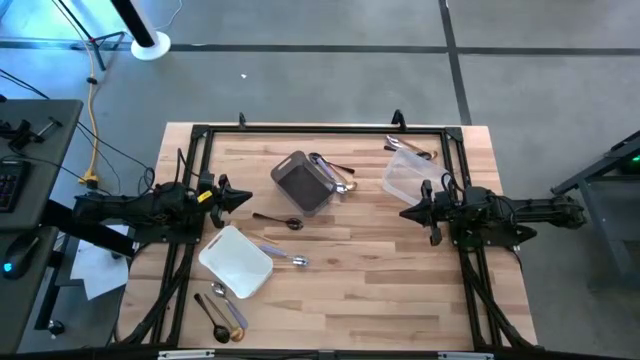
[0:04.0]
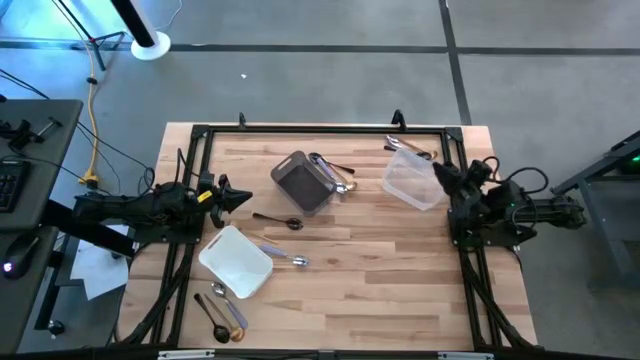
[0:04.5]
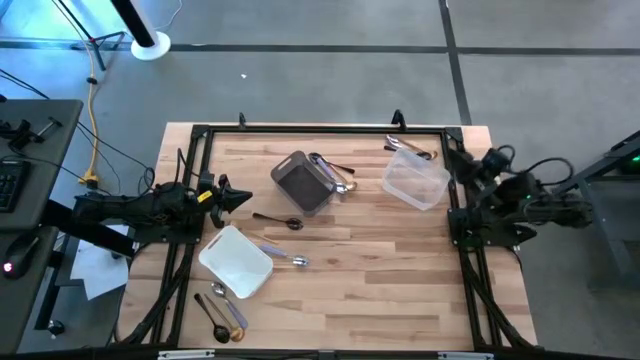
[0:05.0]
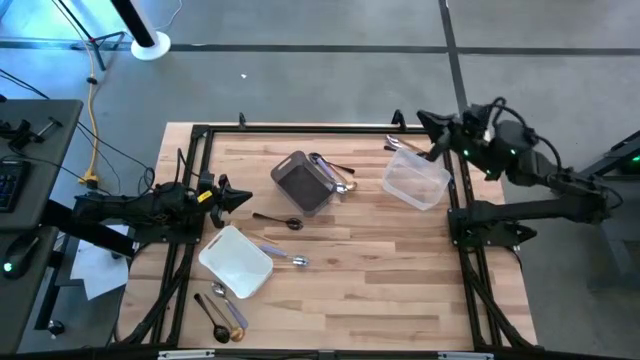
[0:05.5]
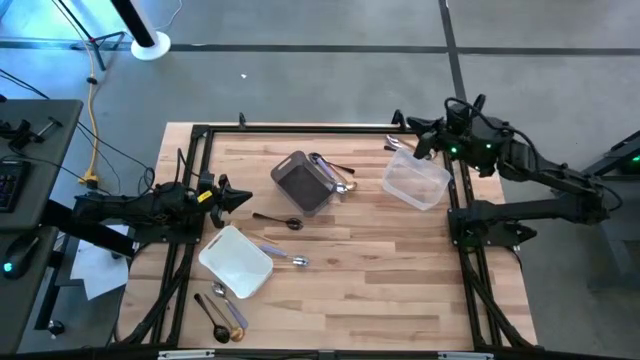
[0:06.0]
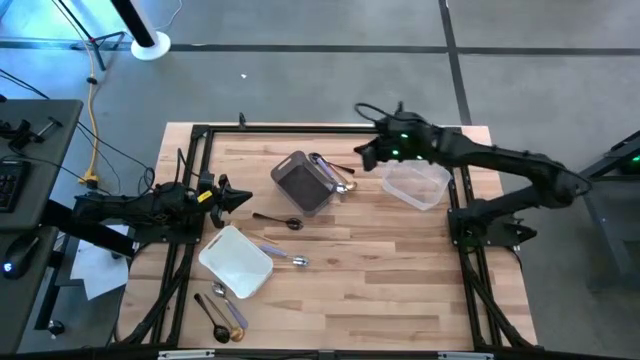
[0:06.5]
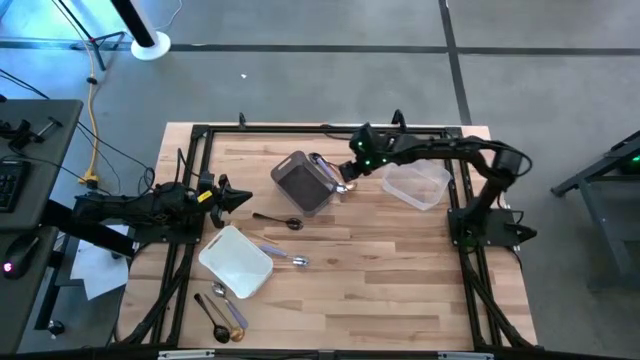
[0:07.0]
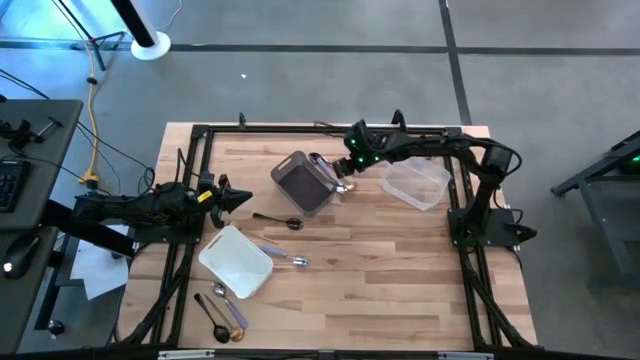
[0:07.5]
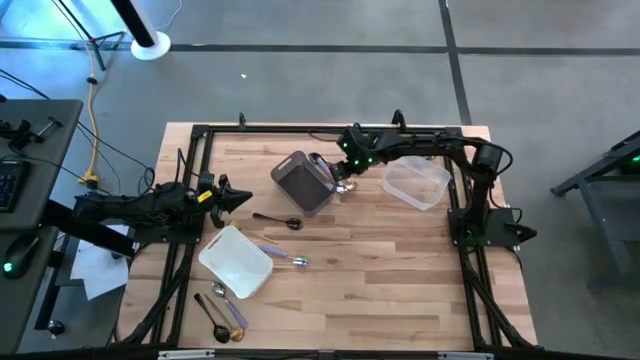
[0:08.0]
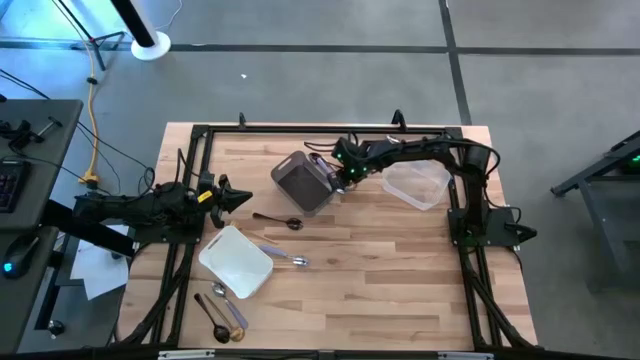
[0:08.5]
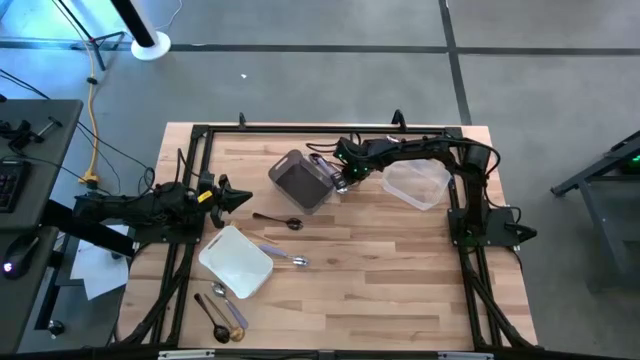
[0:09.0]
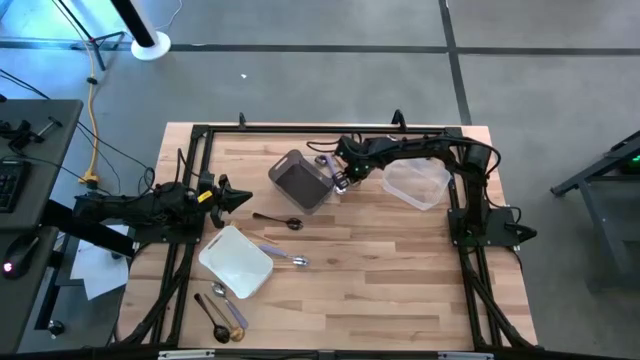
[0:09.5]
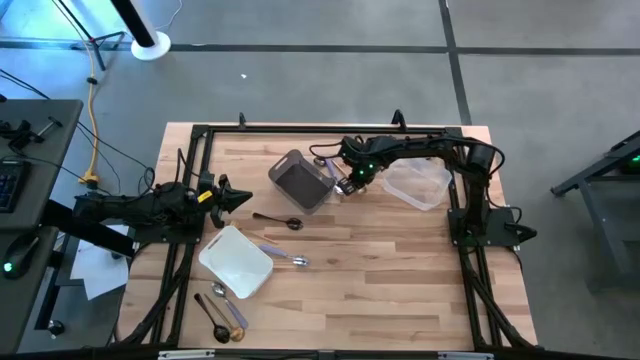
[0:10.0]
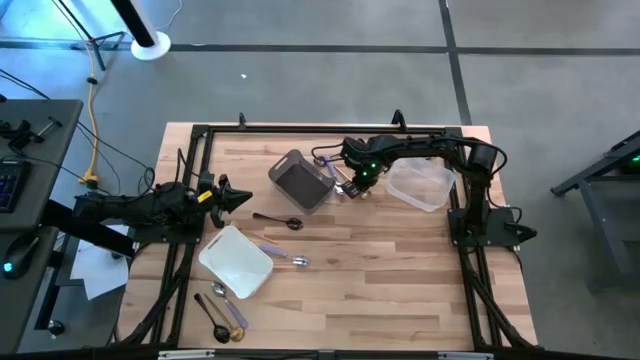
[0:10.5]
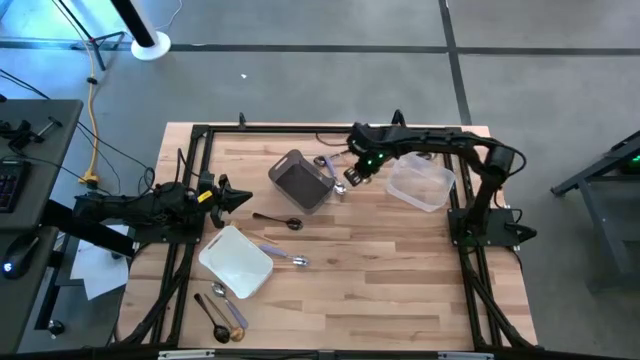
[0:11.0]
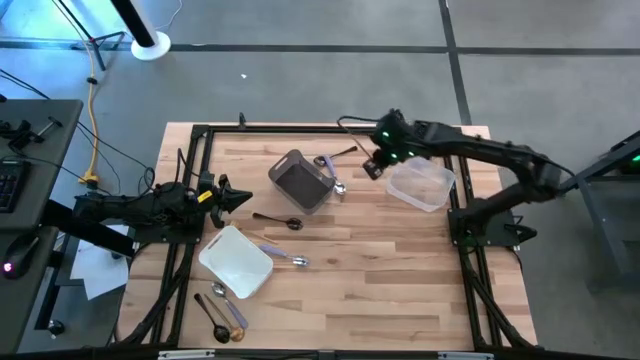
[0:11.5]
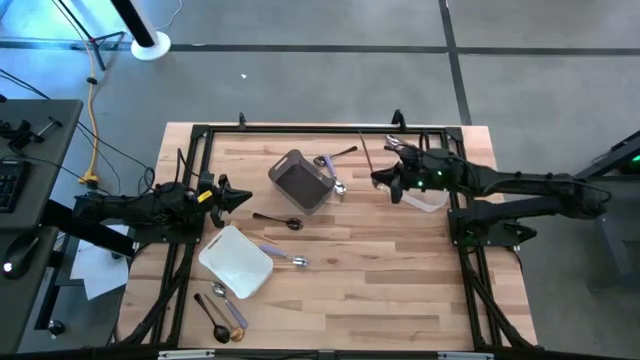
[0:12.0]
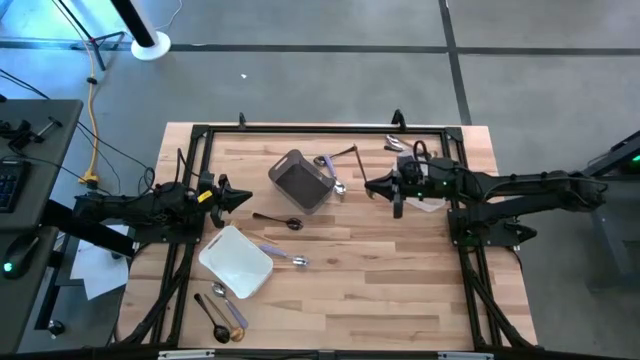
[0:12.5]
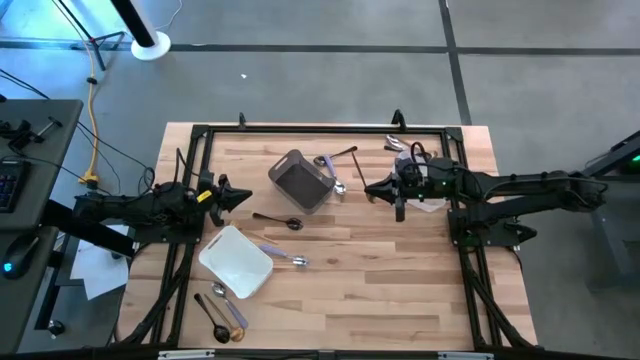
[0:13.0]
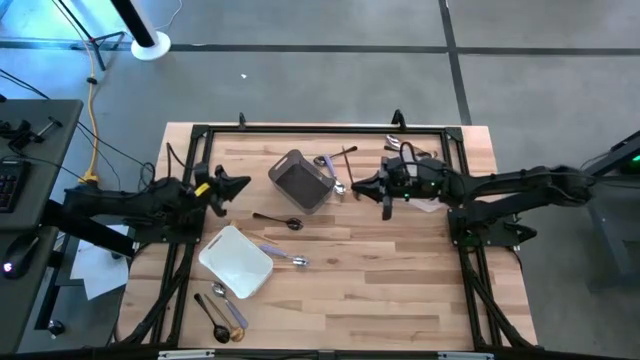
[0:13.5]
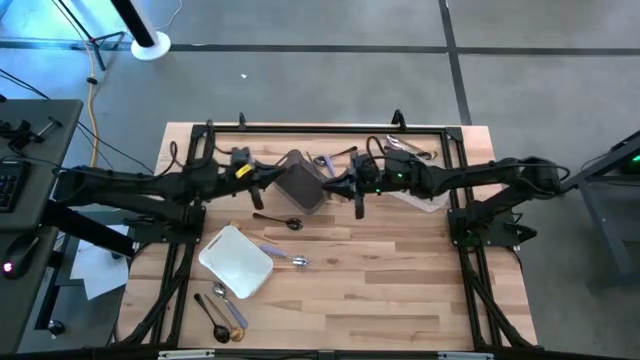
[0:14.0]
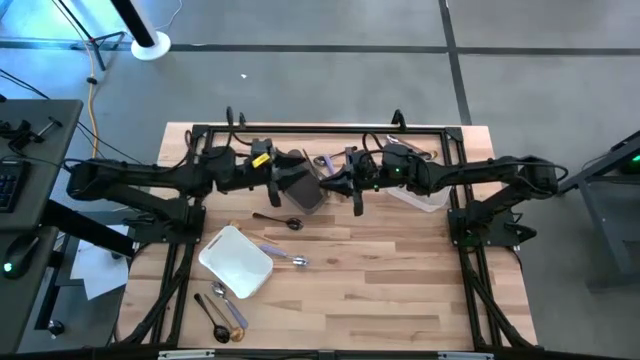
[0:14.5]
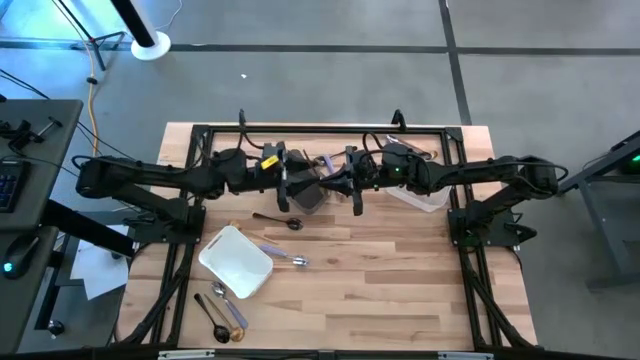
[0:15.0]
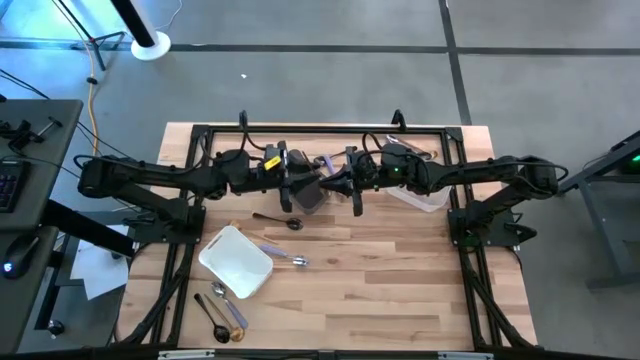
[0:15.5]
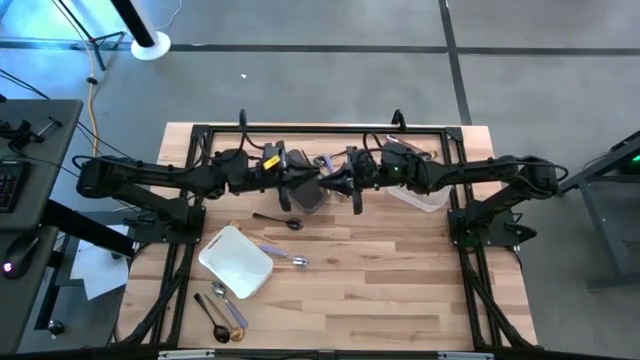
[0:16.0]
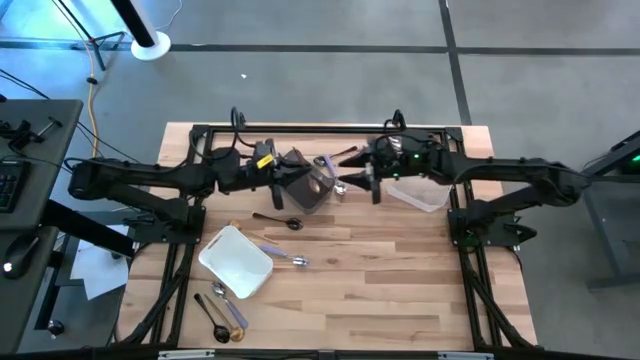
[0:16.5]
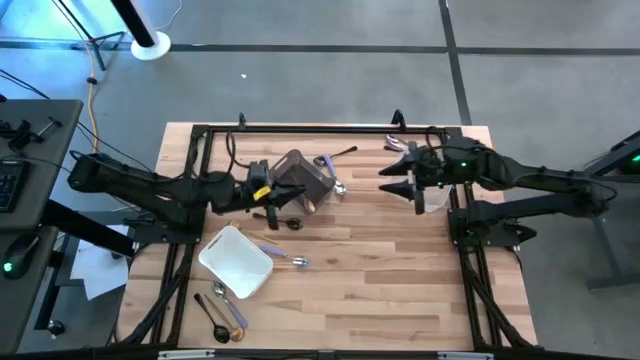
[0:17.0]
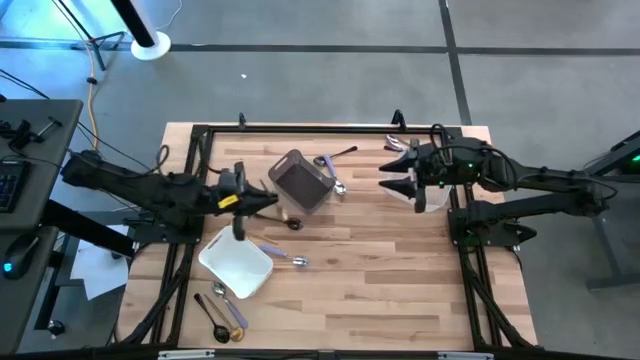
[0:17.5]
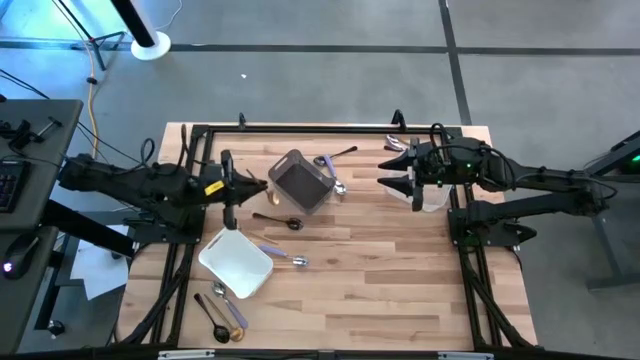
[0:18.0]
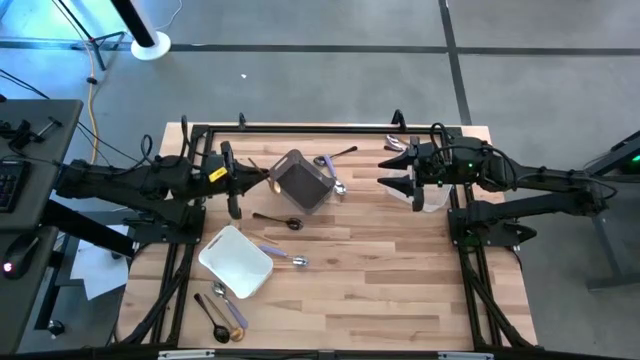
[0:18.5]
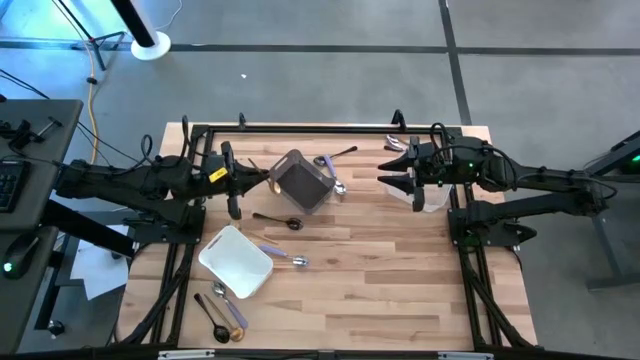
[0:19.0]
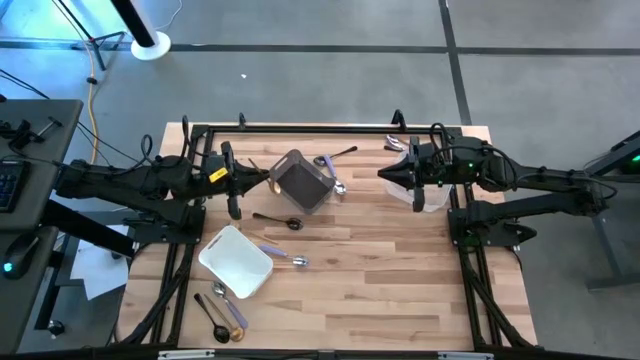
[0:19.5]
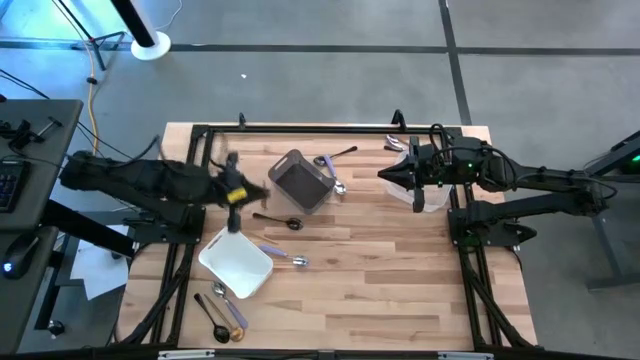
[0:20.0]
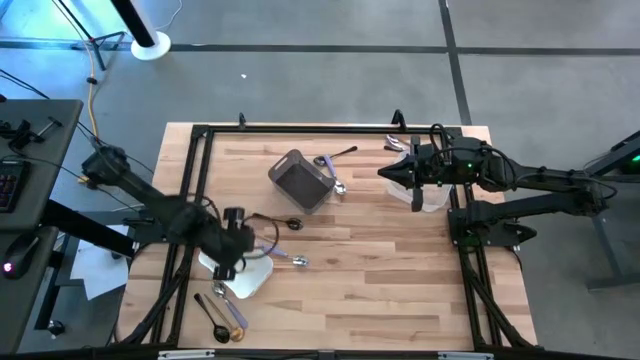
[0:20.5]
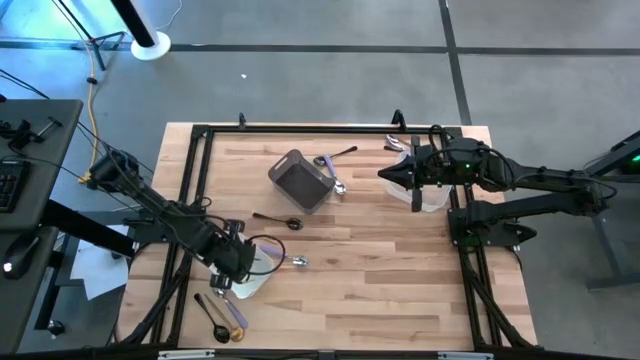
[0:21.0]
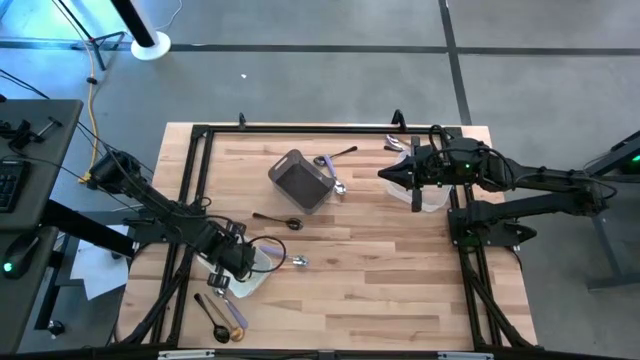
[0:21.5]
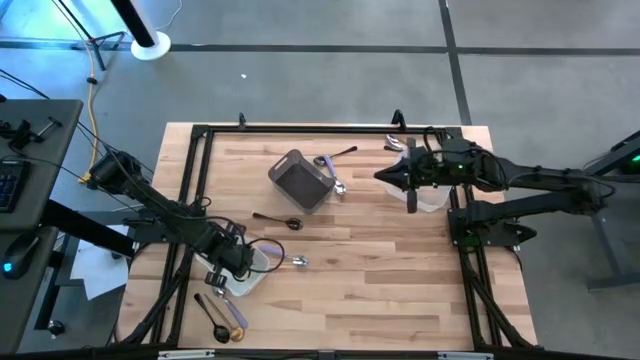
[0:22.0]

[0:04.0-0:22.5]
Task: Sort silverware by color (type)
Put the top left gold spoon into the white bin

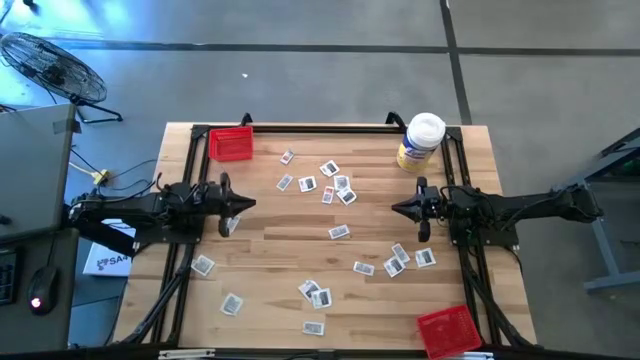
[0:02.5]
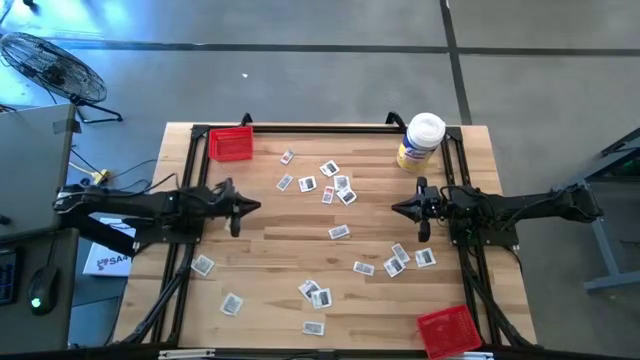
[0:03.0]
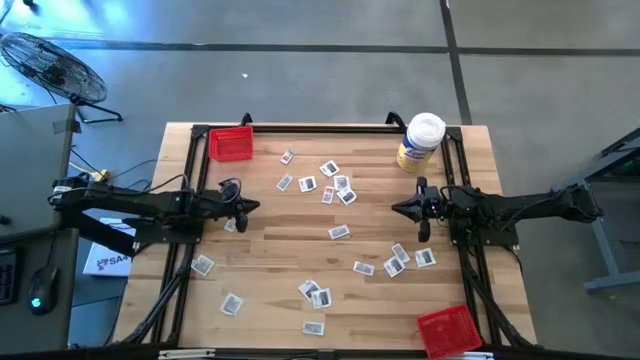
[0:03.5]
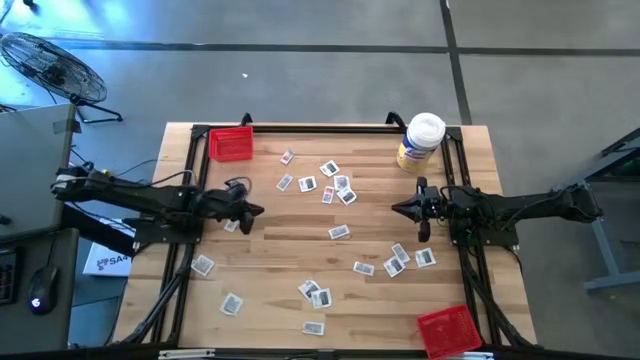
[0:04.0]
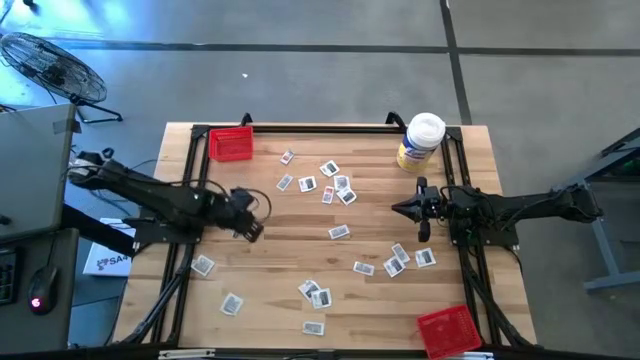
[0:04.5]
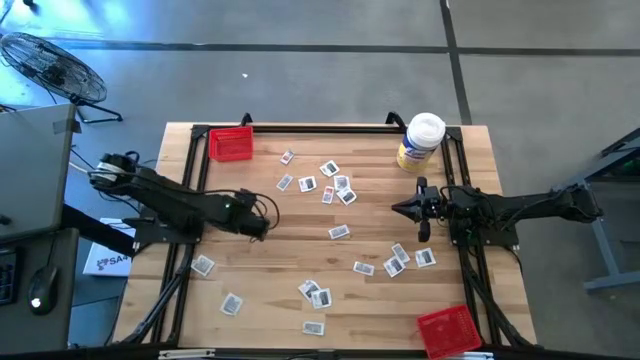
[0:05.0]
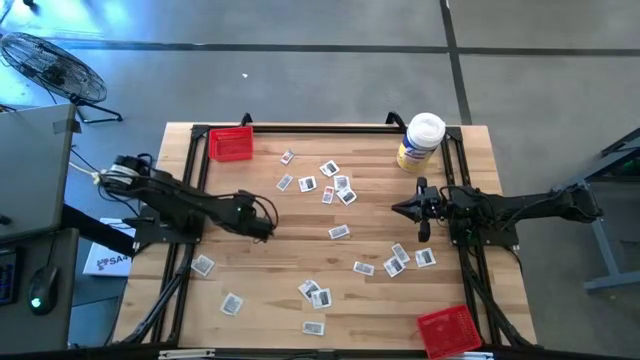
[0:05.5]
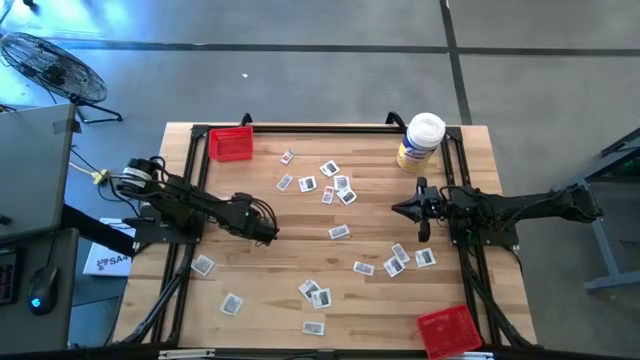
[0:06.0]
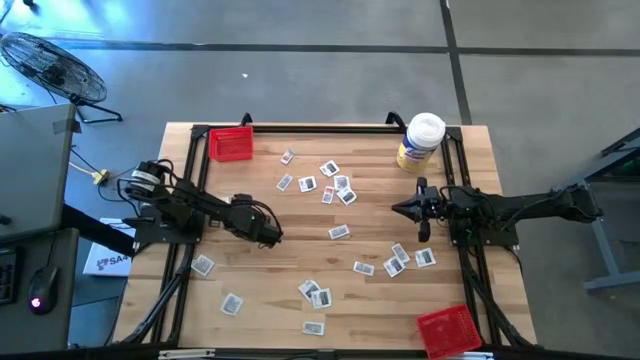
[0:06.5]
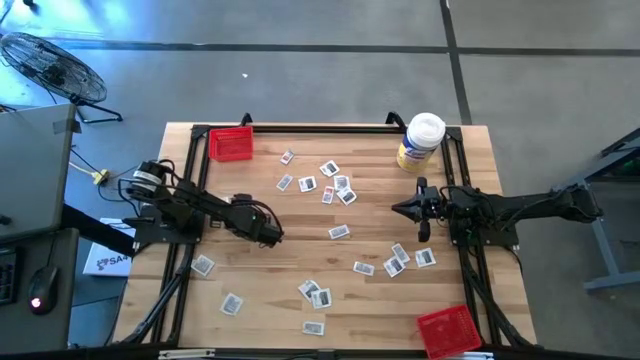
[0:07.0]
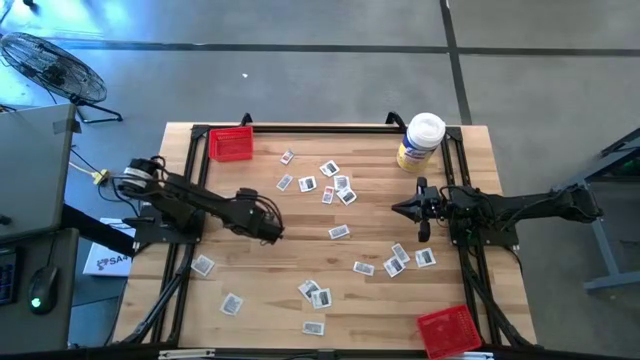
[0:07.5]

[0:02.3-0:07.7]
Task: Pick & Place First Aid Supplies
Put the white and orange ointment pack into the top red bin
